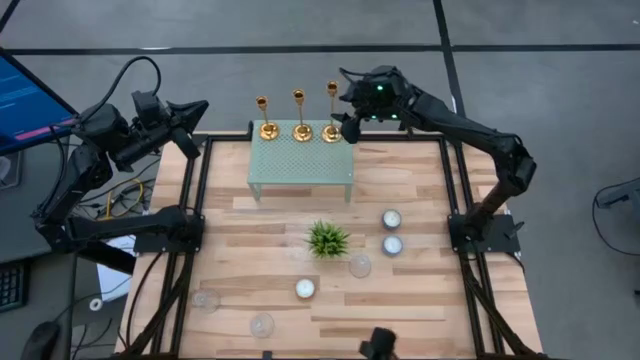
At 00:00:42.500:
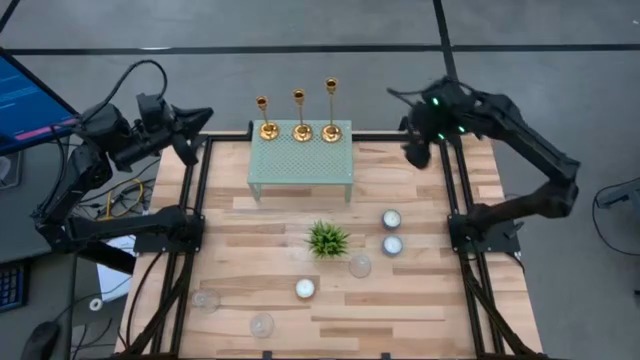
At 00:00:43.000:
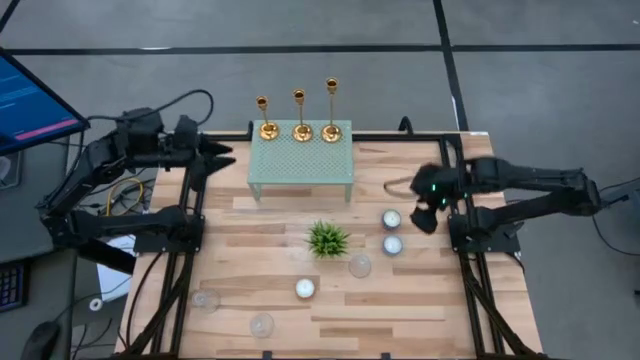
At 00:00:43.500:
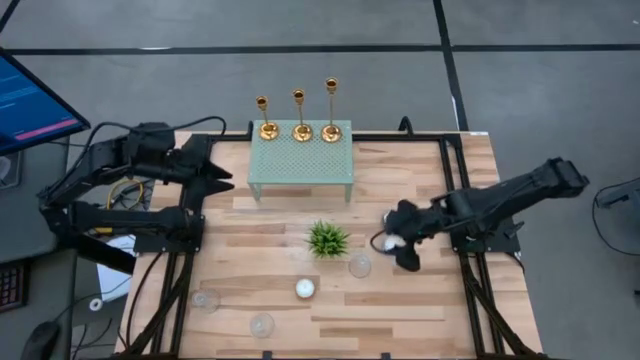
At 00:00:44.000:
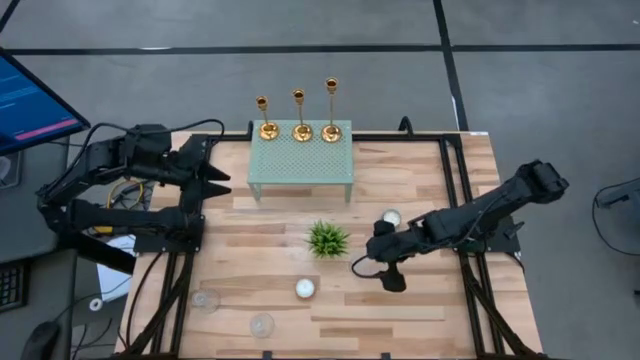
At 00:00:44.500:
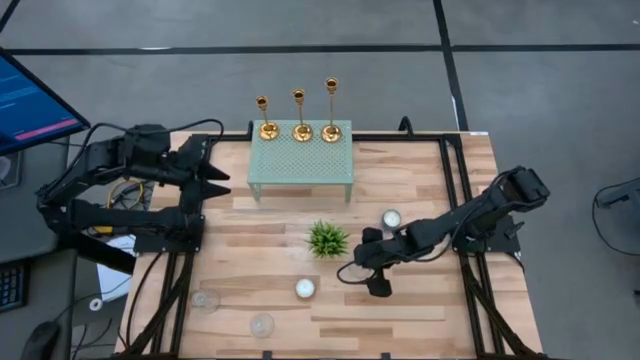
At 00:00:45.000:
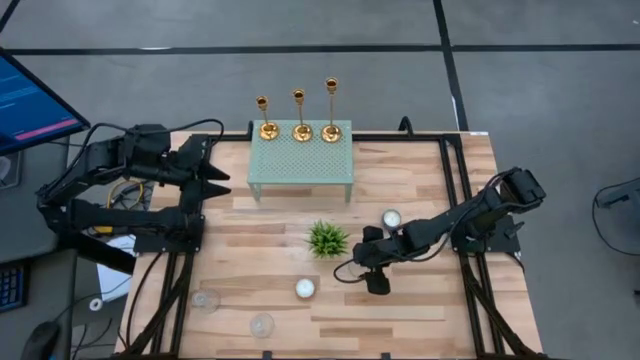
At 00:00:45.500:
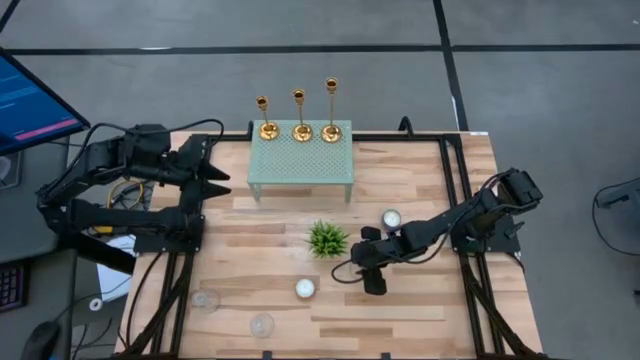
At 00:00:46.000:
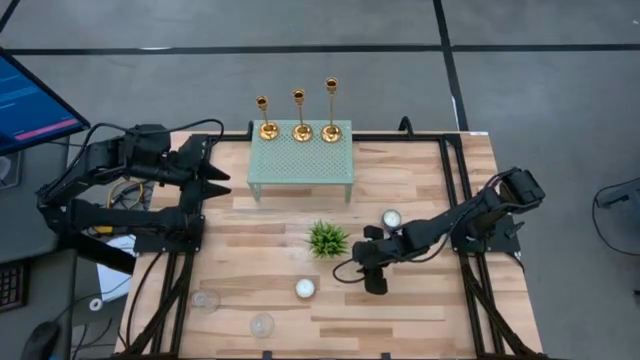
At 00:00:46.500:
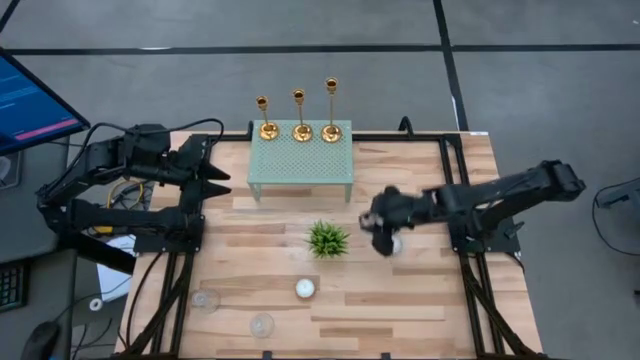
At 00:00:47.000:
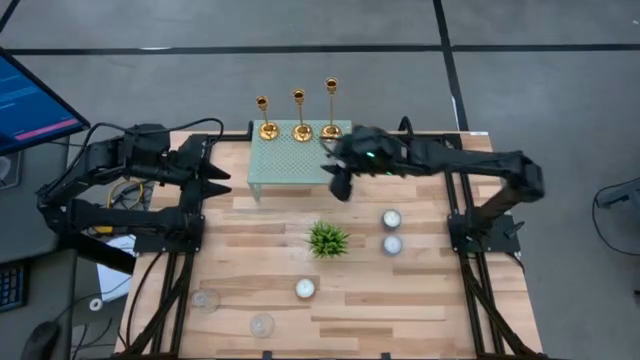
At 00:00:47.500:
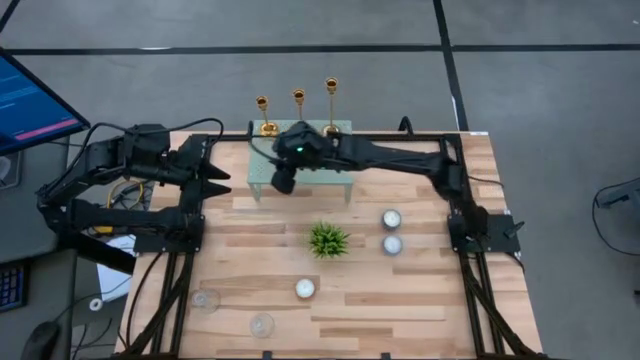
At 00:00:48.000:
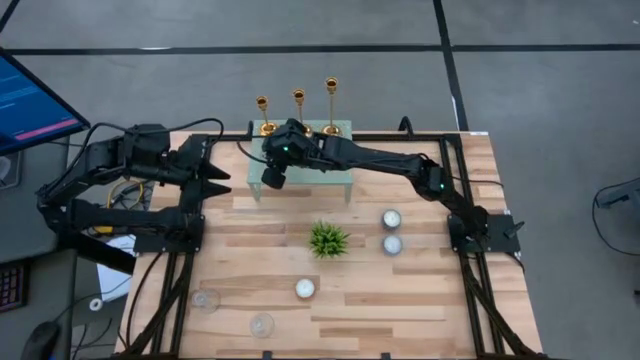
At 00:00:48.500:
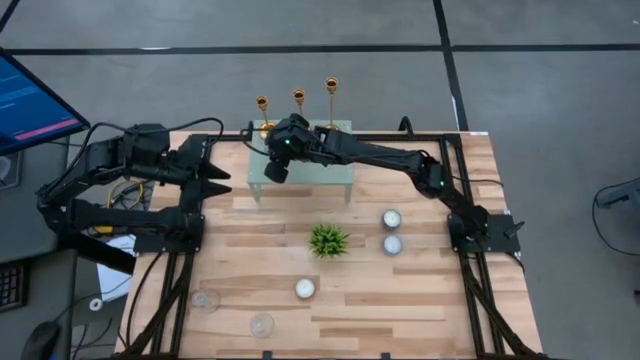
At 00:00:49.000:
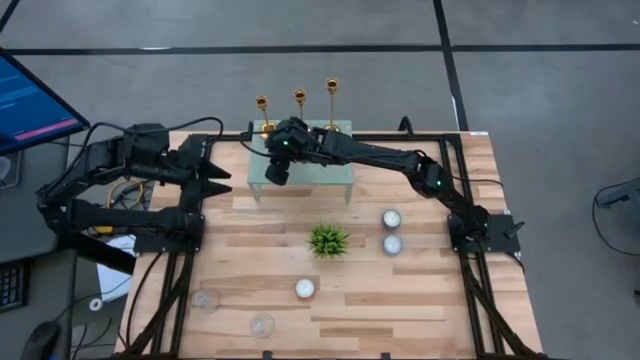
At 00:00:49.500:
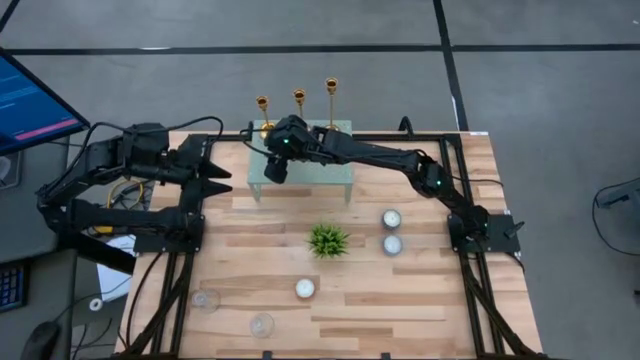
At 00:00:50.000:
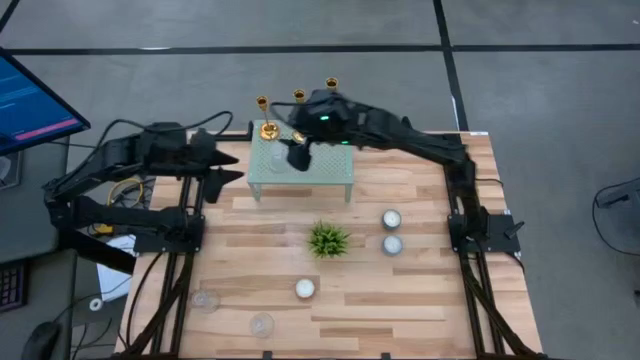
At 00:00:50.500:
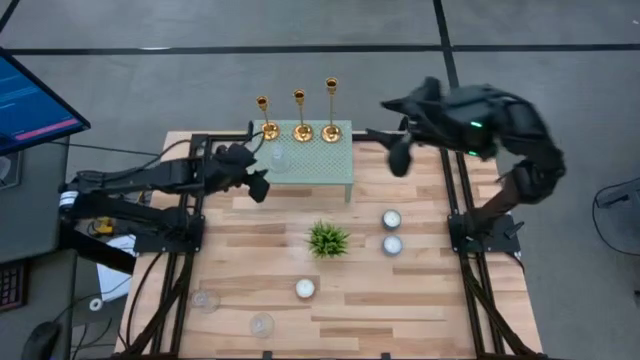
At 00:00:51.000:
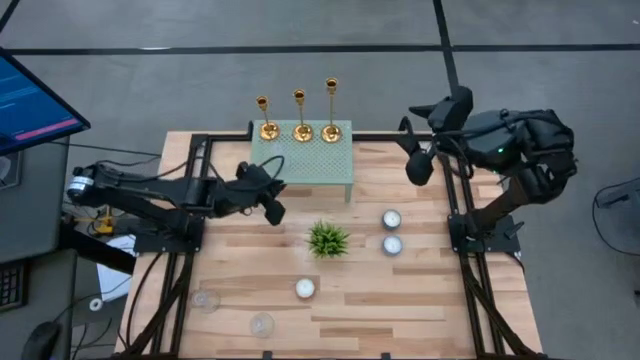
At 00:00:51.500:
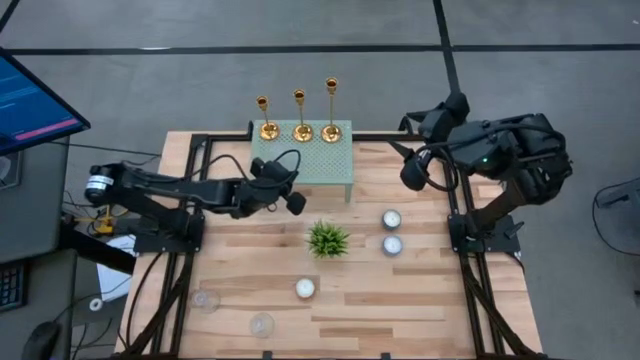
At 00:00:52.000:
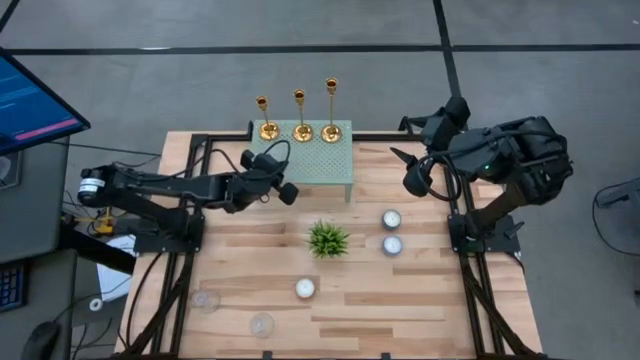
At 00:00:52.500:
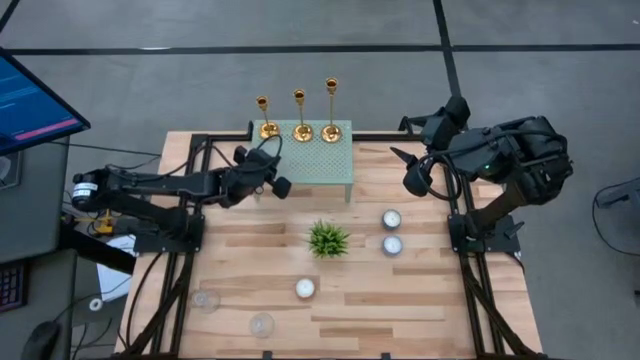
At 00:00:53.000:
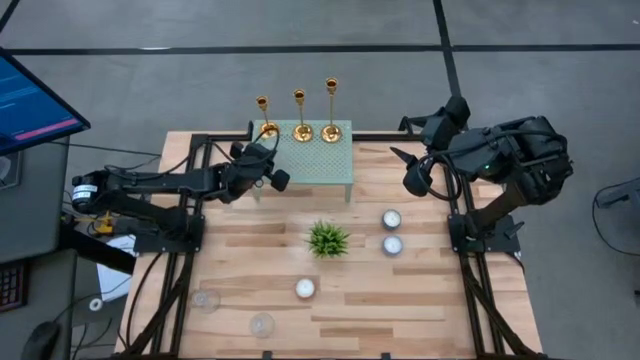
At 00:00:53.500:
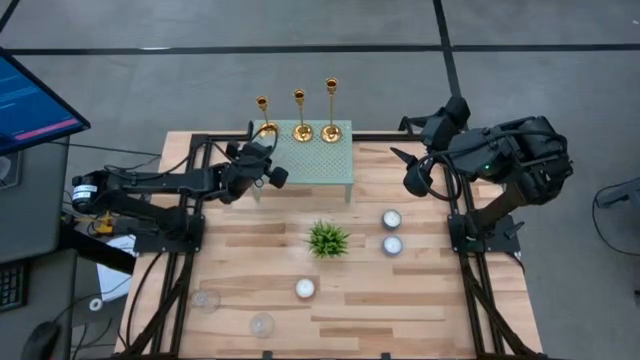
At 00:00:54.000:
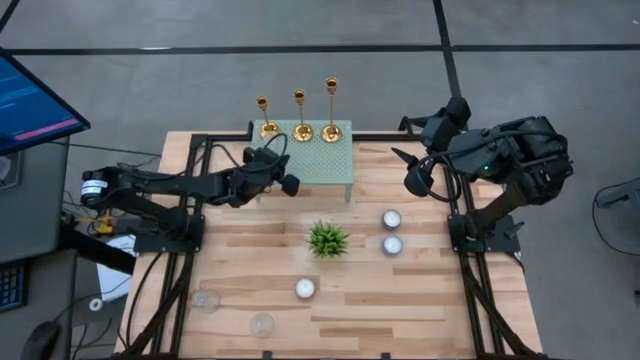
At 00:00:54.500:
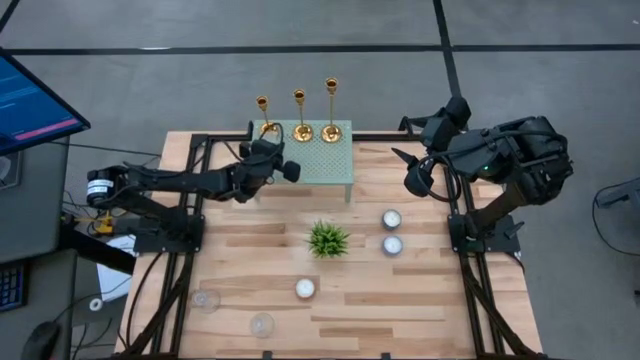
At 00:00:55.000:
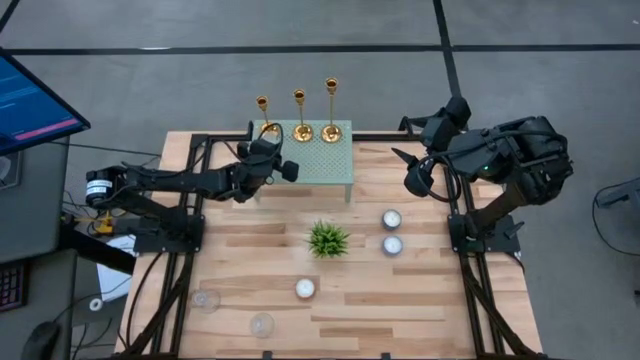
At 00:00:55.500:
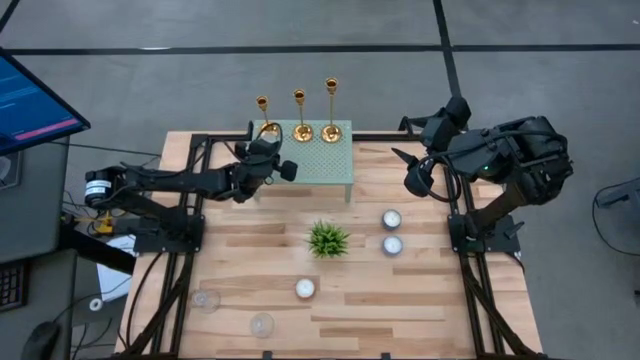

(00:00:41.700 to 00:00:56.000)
Task: Pick & Place candle stick holders
Put the top right glass candle holder on the shelf
